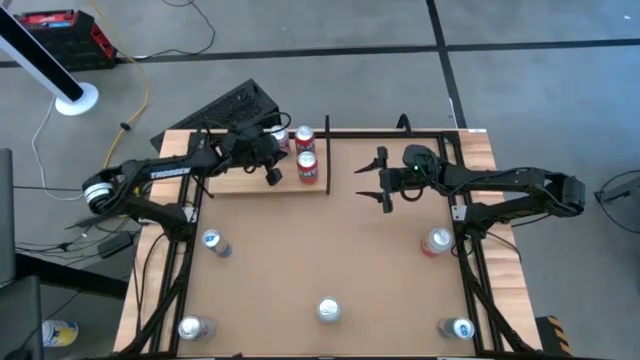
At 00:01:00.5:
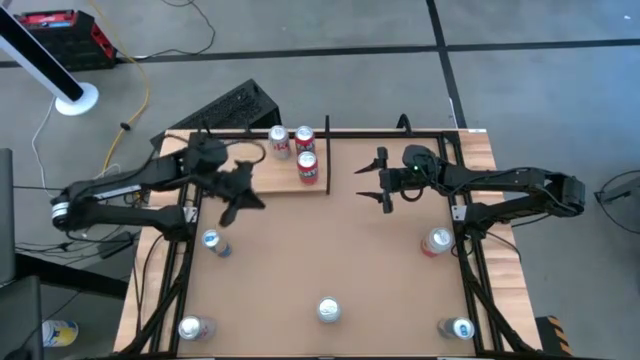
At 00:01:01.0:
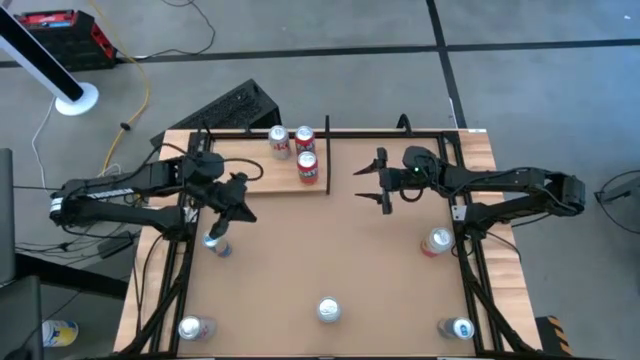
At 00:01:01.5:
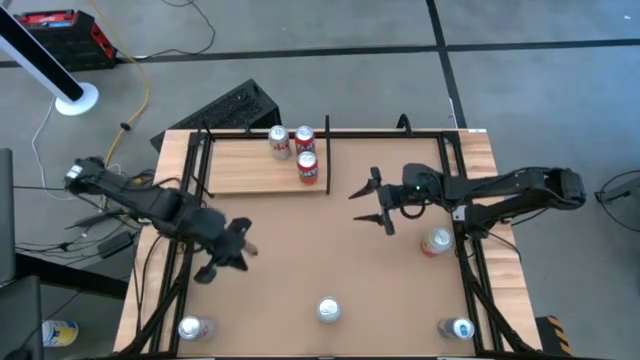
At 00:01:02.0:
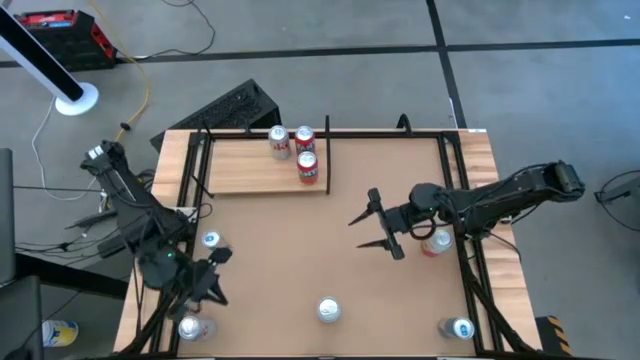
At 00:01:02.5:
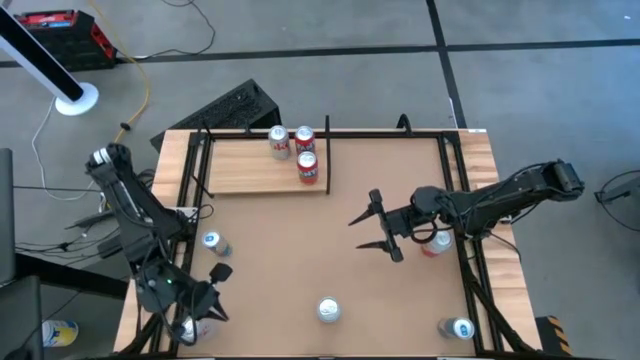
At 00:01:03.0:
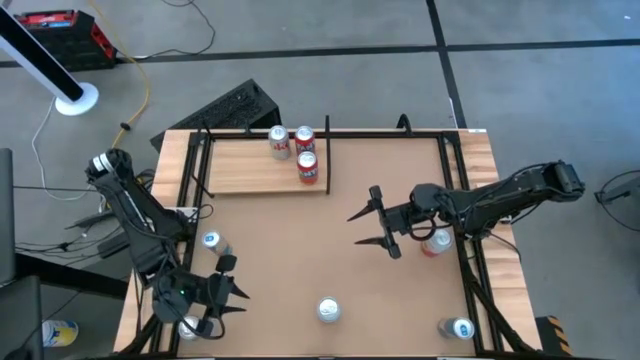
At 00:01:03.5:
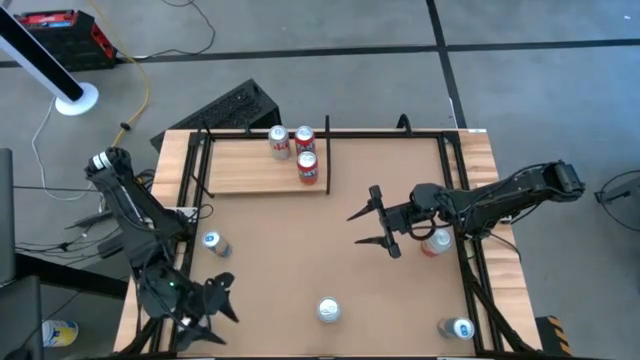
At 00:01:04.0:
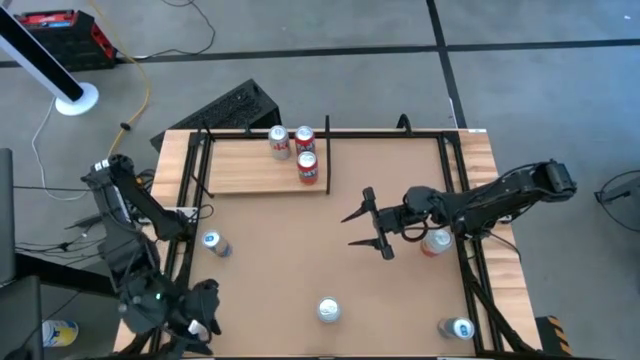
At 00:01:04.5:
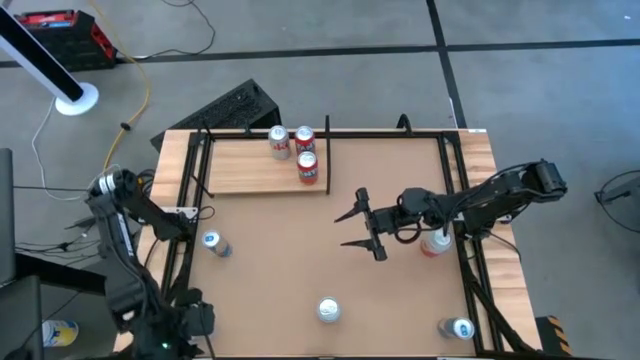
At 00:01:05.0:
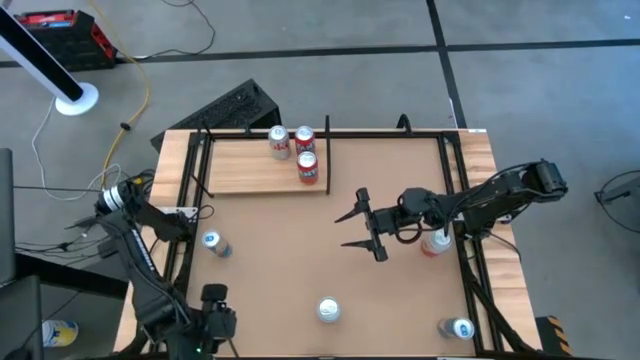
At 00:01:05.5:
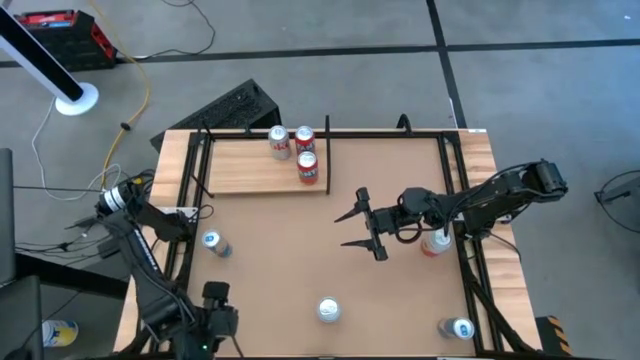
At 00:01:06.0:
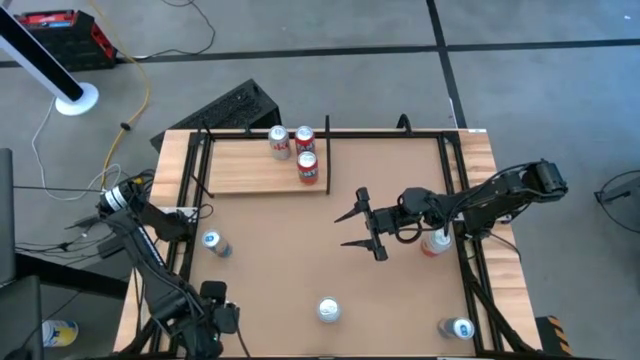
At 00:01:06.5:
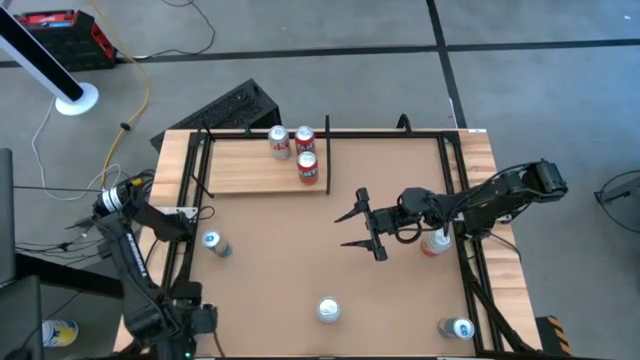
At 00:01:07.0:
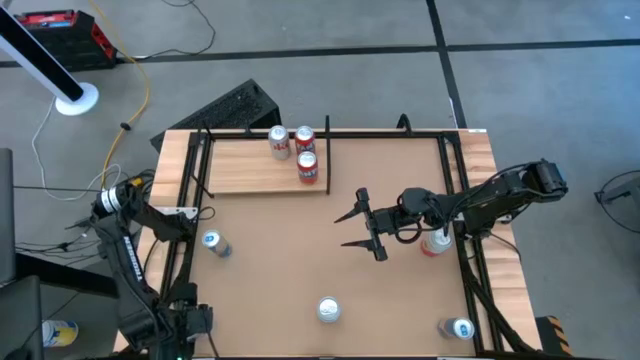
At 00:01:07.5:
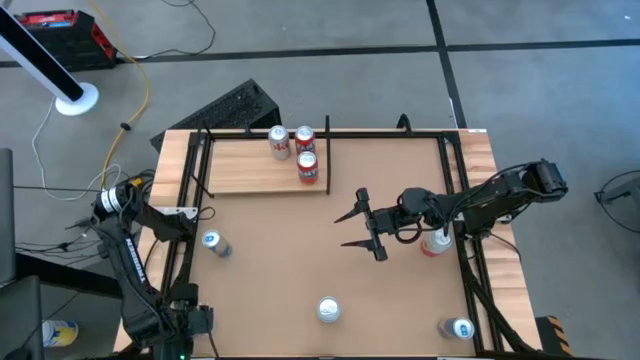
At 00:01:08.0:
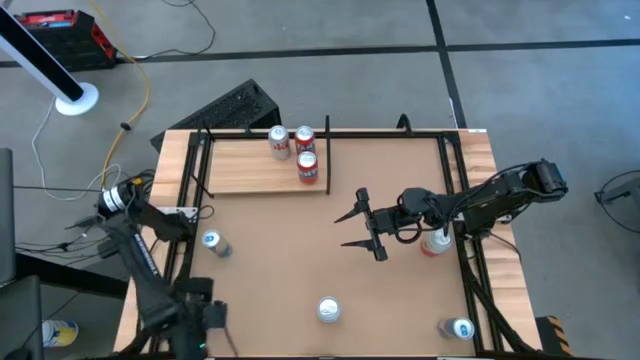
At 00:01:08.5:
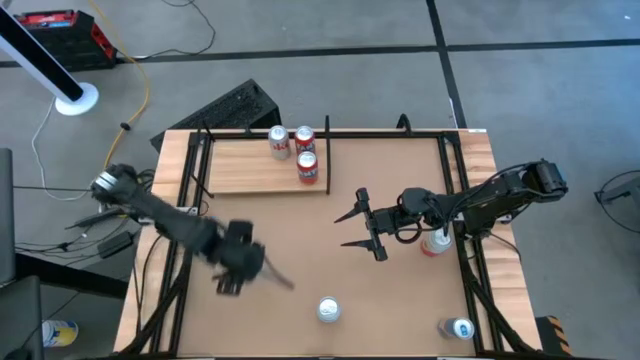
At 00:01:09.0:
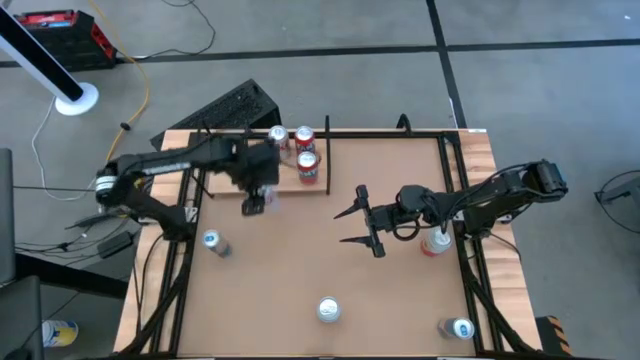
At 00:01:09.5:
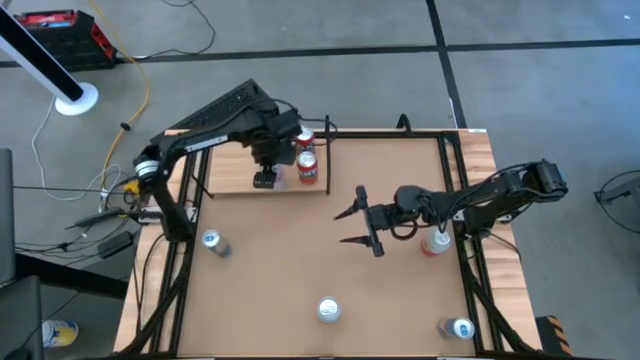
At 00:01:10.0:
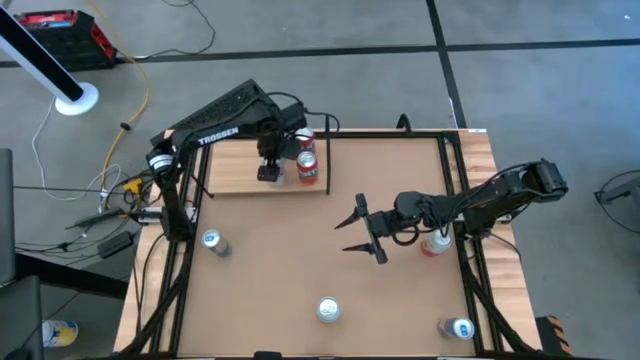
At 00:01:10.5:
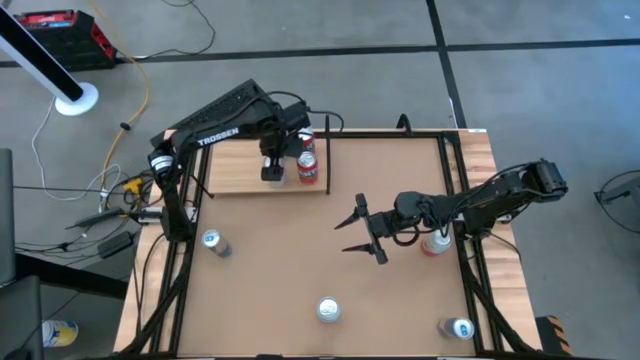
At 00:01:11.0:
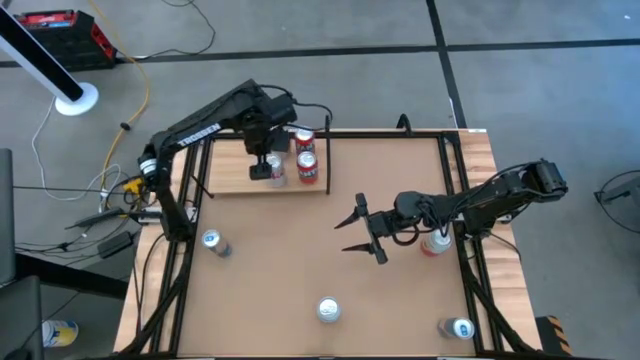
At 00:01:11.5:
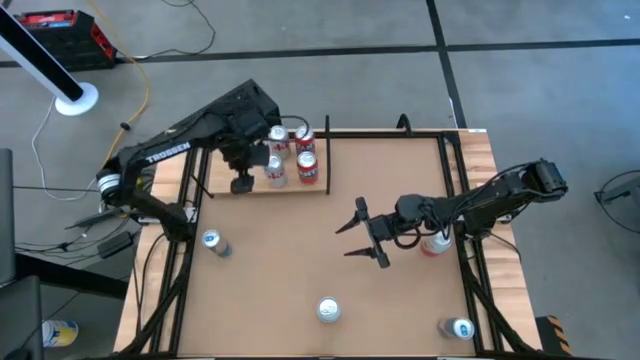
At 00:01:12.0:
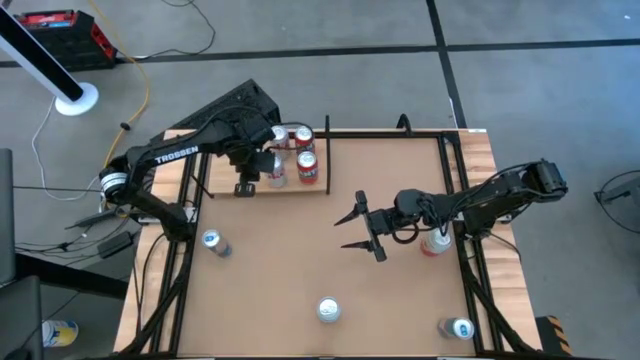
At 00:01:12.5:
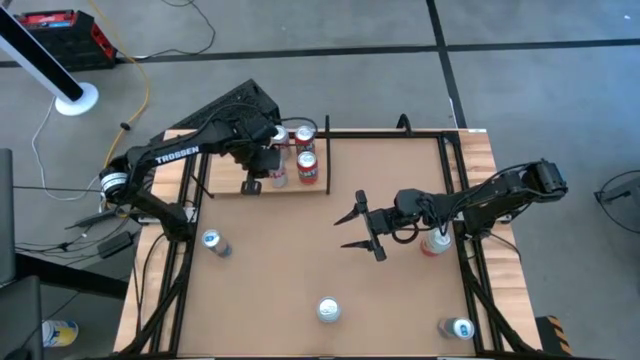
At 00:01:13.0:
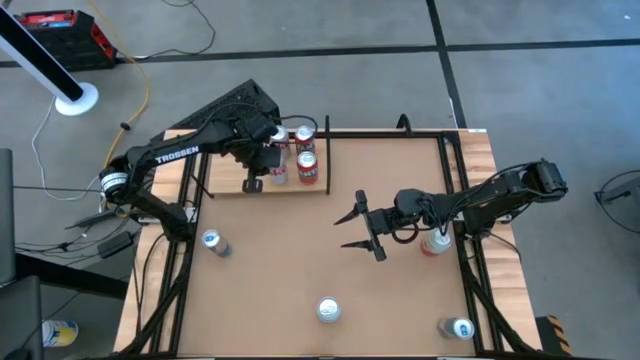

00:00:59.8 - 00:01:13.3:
Task: Place canned beverage on shelf
Put the red-silver soda can on the shelf aligned with the other red-silver soda can

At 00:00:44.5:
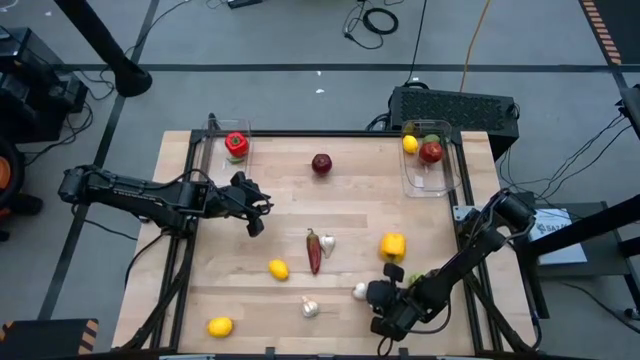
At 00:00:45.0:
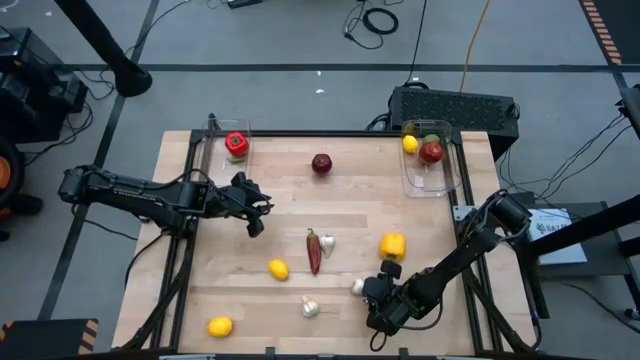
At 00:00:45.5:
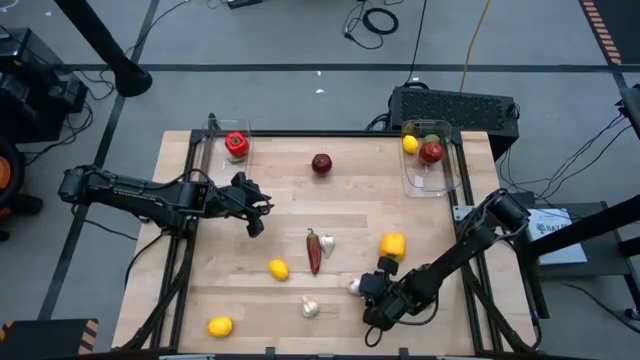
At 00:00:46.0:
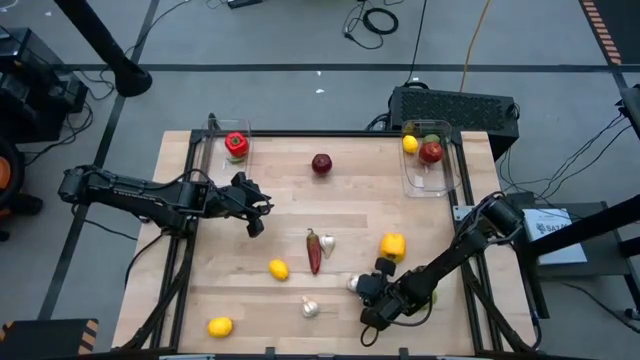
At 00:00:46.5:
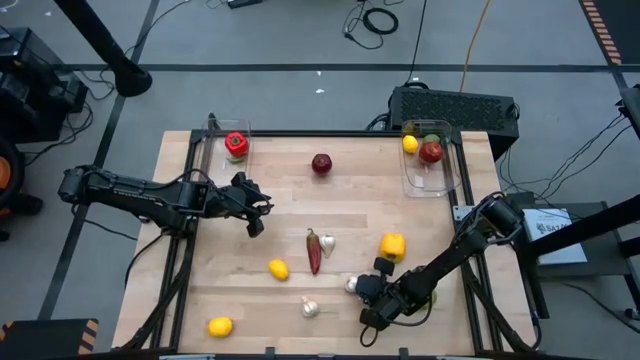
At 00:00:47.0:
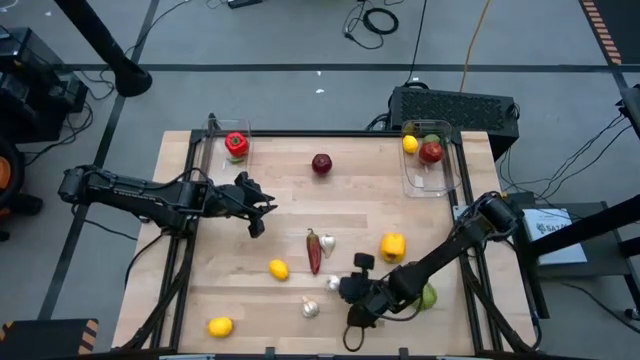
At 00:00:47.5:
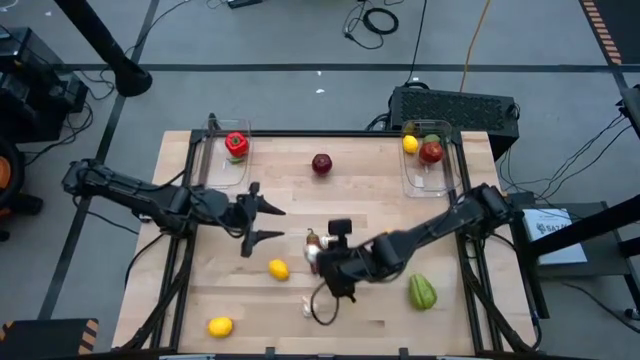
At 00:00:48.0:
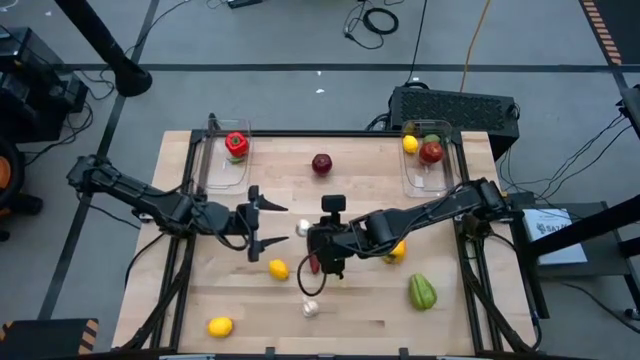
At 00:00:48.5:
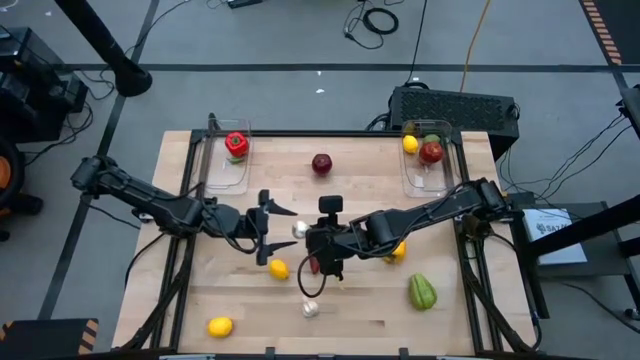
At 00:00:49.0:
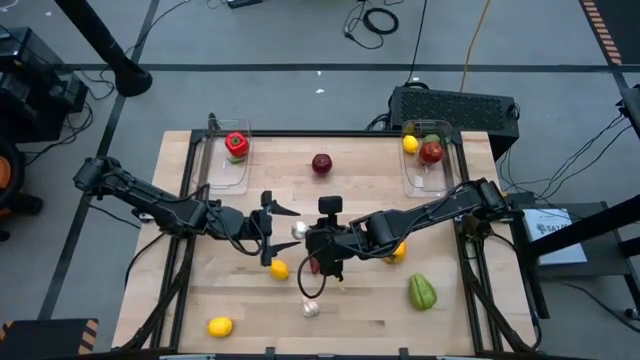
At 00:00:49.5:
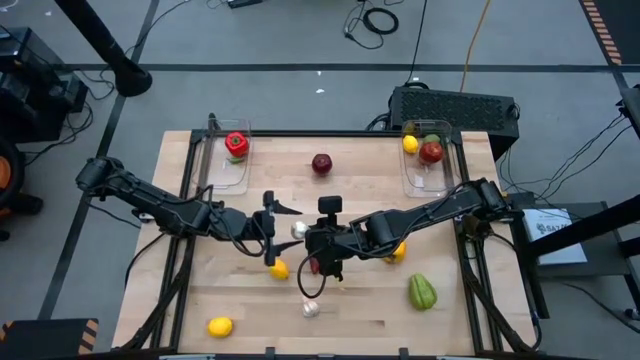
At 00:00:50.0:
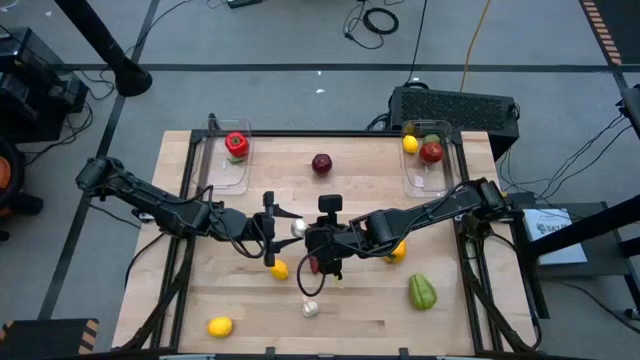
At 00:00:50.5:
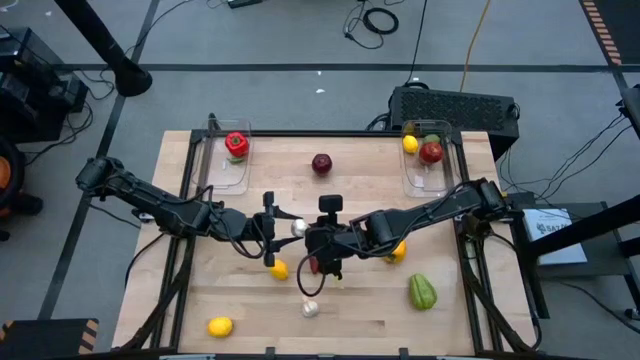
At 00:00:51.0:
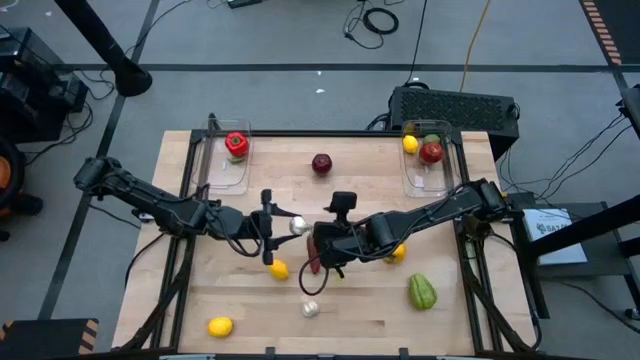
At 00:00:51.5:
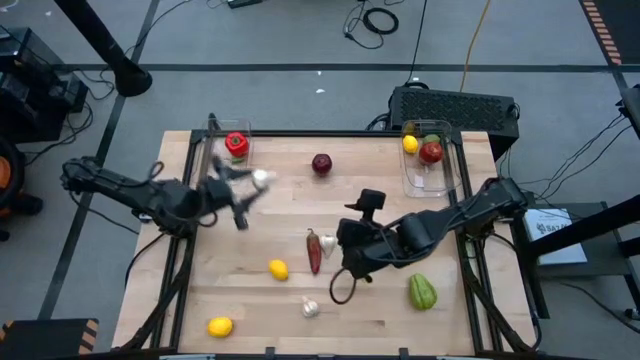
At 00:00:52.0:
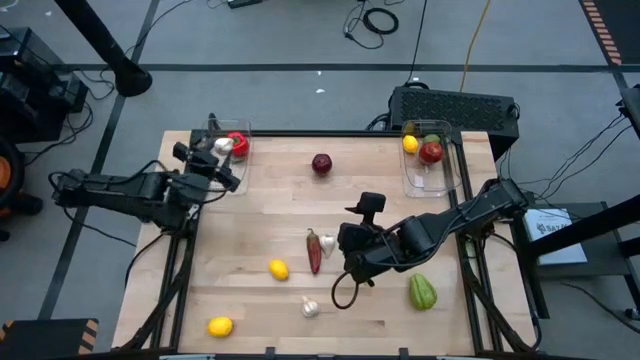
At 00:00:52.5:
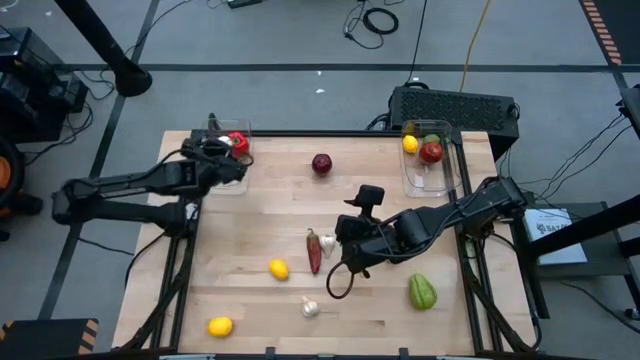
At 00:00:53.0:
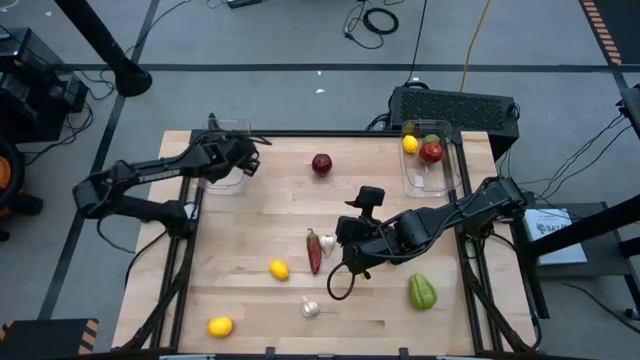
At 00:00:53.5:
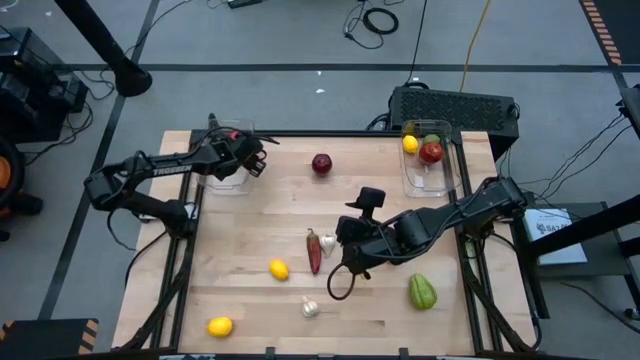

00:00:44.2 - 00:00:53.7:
Task: Sort produce into baskets
Put the bottom right white garlic into the left transparent bin
